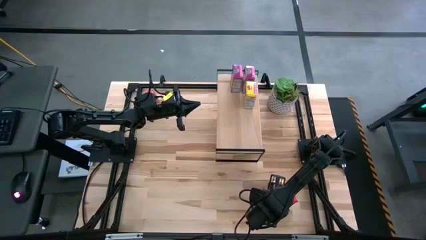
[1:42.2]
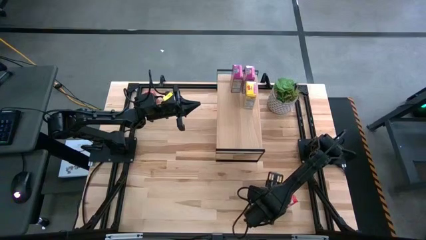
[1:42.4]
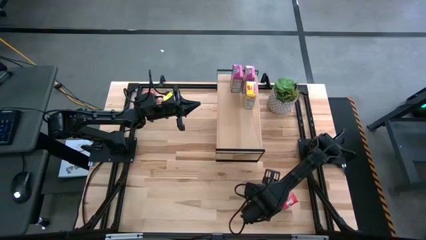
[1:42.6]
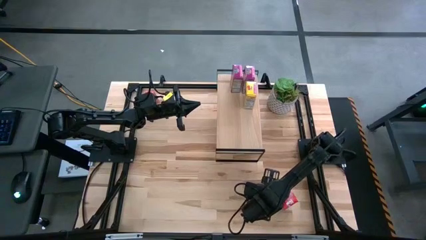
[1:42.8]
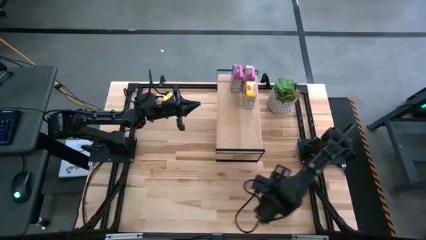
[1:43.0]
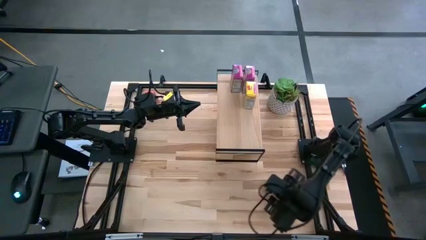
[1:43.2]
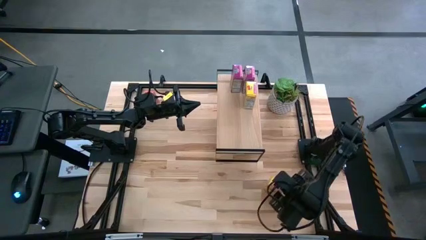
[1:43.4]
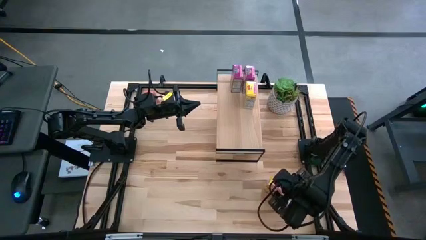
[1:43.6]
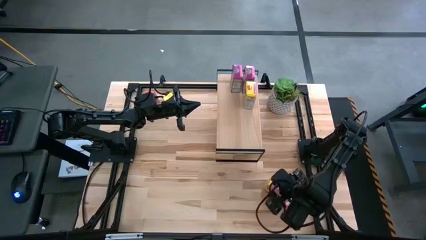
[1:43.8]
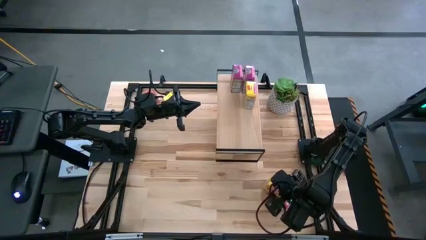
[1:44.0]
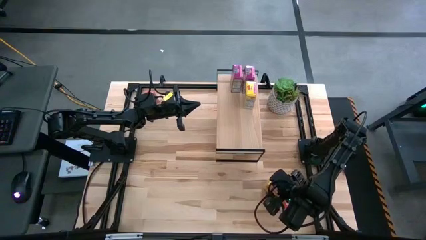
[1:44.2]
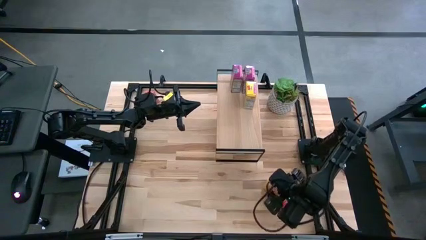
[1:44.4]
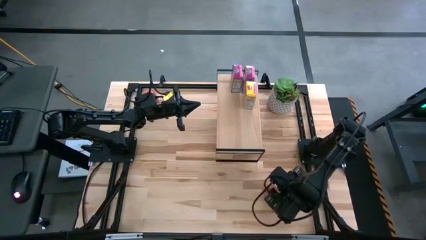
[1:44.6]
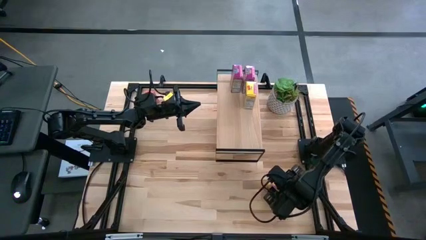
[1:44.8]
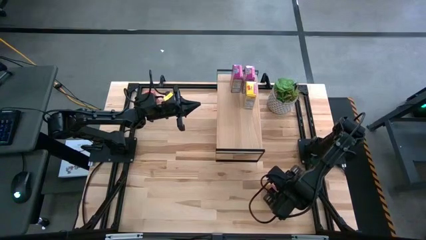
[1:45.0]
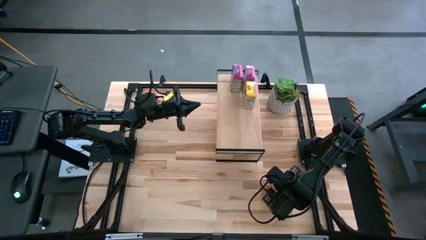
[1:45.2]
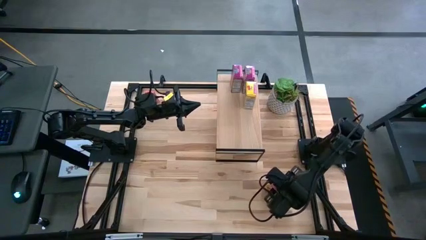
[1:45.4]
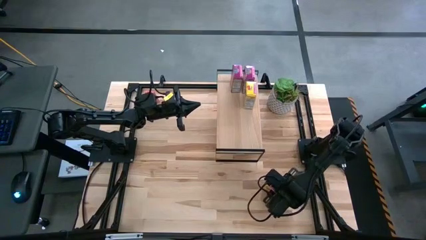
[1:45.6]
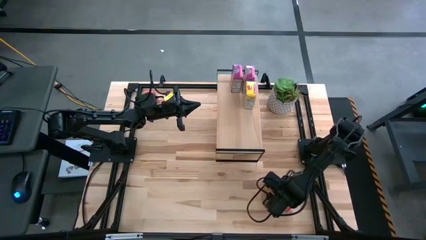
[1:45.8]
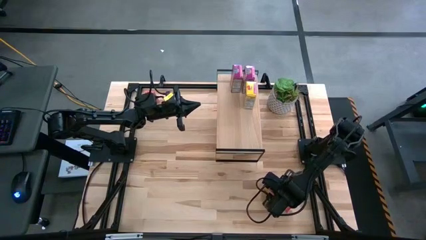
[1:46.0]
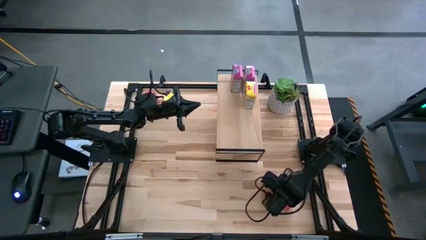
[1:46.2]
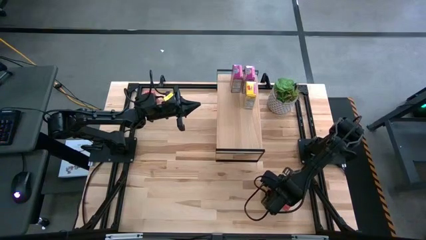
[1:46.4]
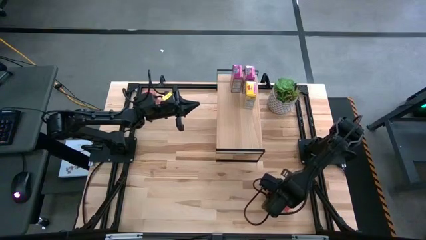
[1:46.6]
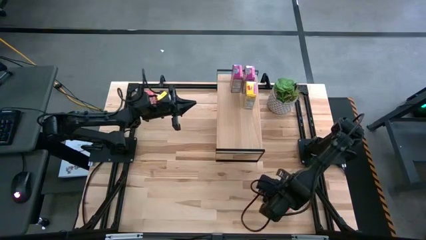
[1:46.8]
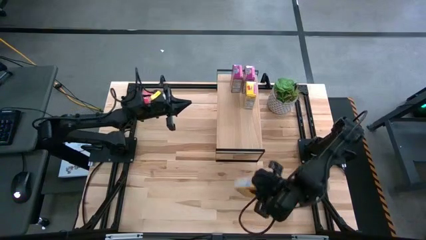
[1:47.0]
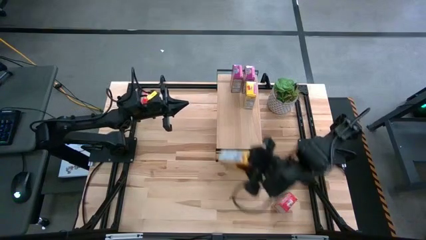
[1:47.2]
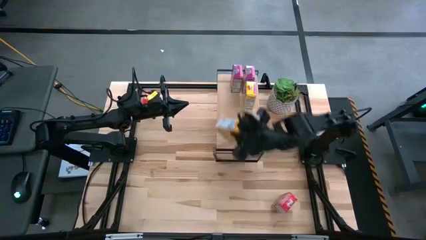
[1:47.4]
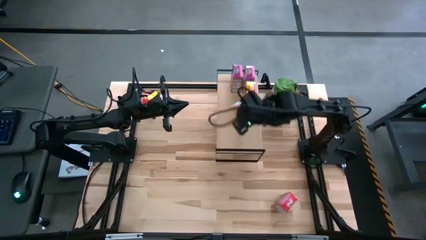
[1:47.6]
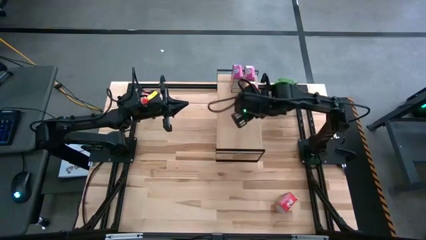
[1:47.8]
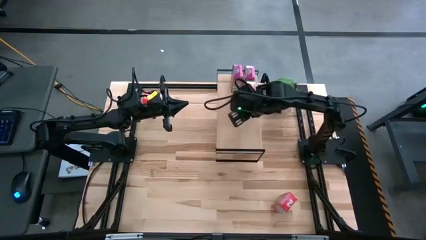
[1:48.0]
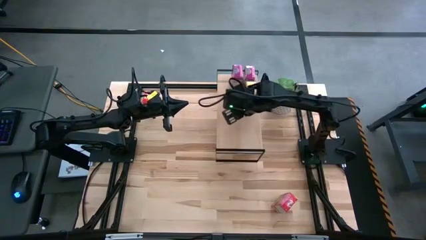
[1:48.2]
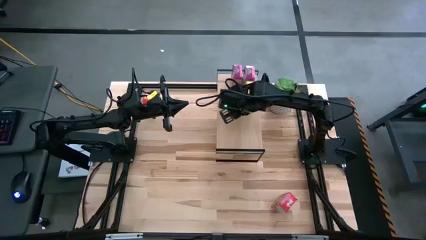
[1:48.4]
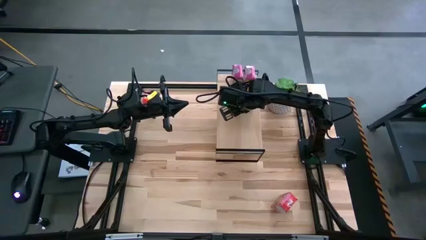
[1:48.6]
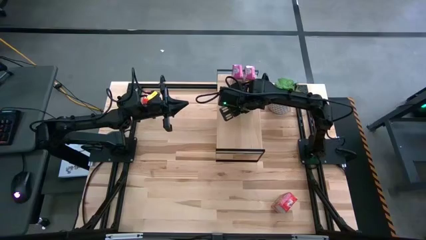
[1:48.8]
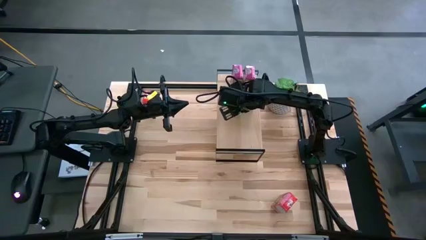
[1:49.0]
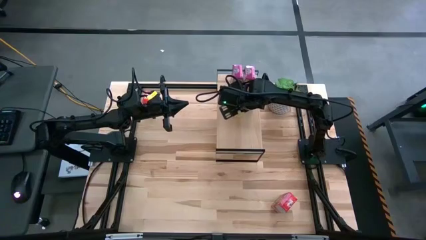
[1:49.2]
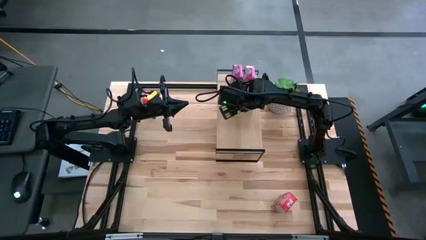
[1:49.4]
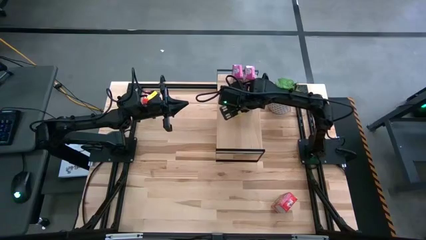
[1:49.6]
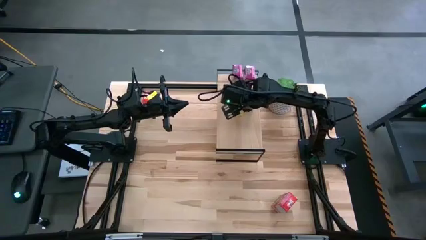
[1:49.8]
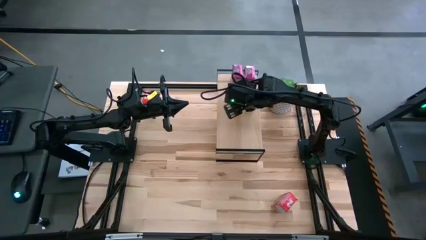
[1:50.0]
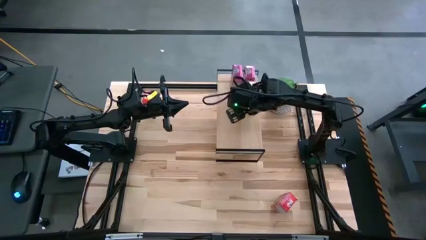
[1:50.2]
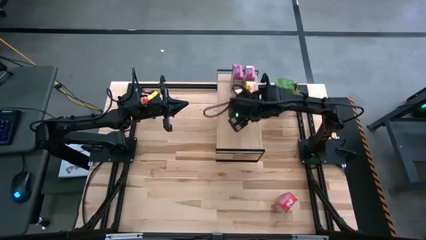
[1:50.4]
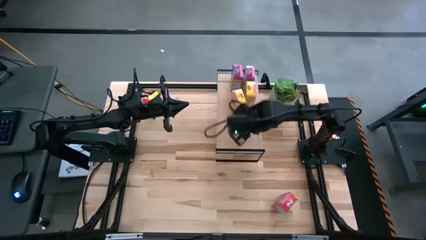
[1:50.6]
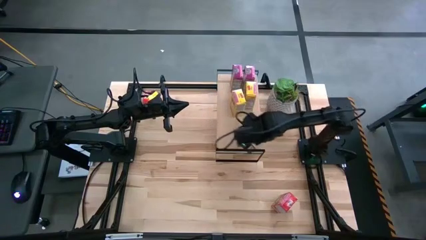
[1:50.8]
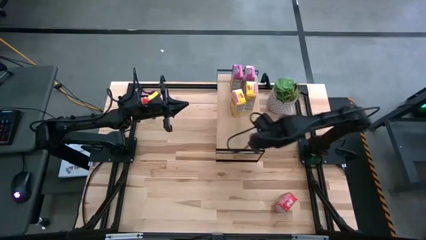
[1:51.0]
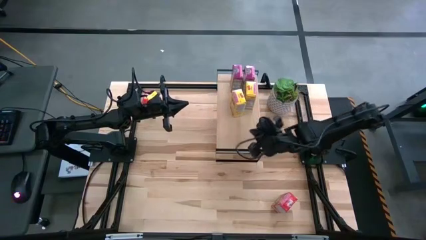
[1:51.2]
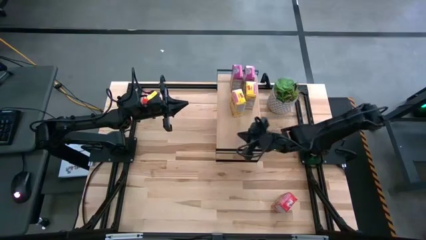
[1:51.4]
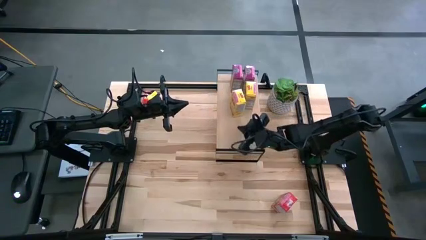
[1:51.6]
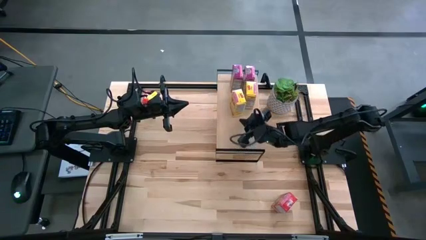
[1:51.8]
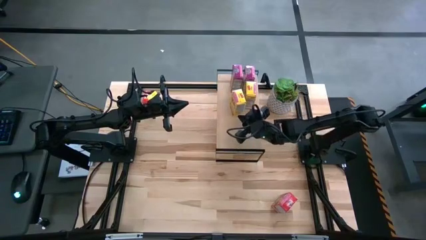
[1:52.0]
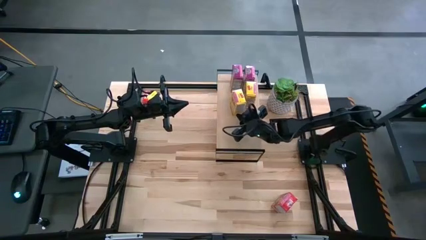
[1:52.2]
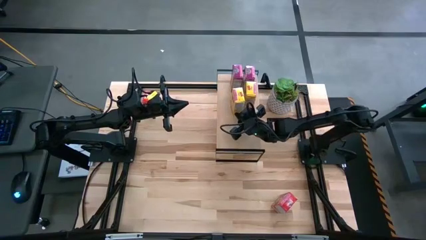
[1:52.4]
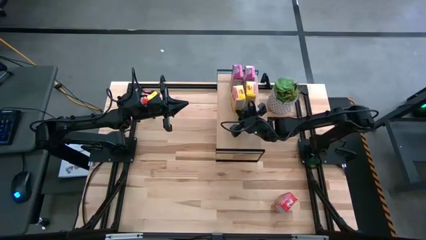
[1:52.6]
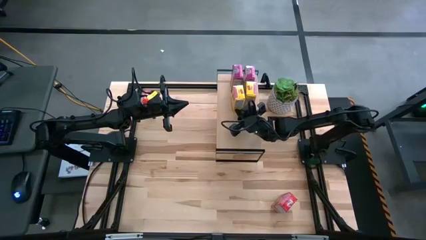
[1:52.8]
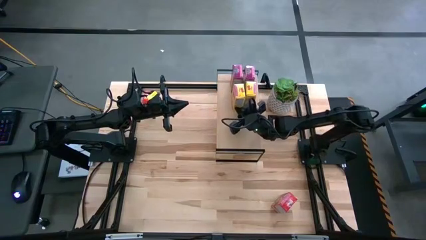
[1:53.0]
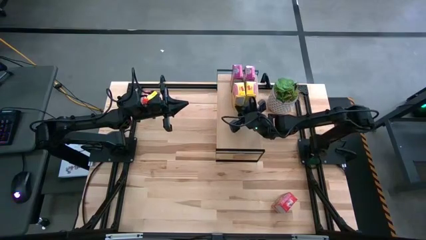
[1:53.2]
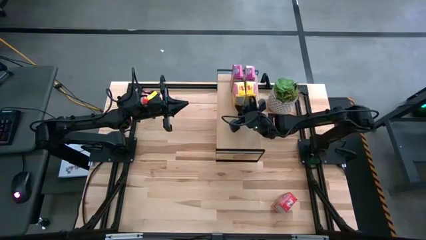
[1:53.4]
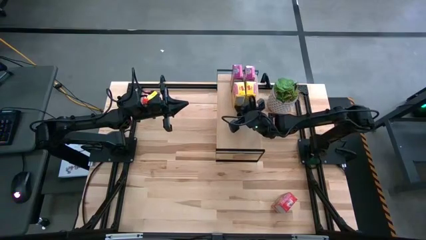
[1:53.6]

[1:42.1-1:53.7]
Task: Stack cereal on shelf
Put the yellow cereal box on the shelf aligned with the yellow cereal box
